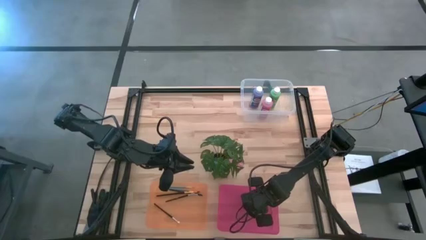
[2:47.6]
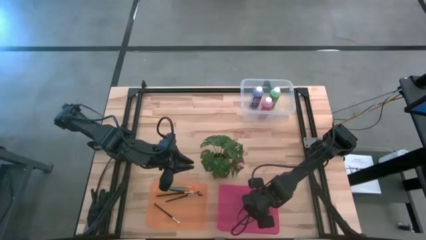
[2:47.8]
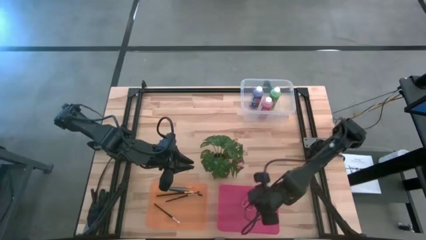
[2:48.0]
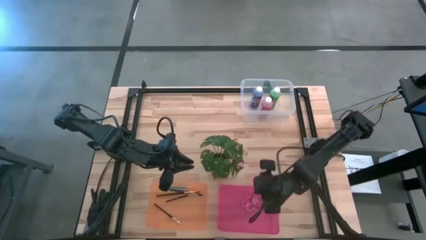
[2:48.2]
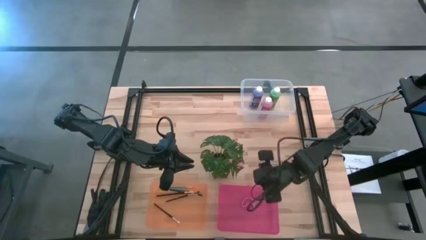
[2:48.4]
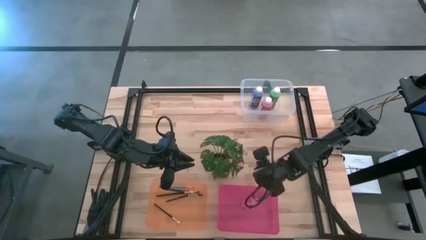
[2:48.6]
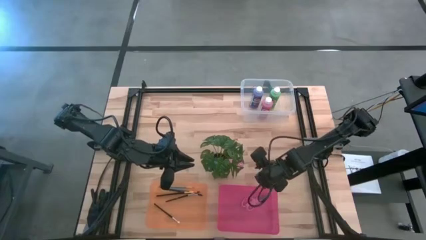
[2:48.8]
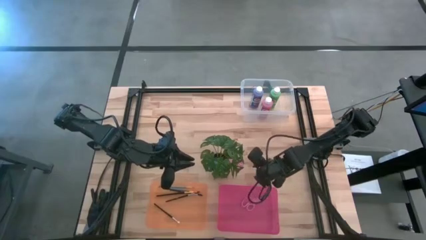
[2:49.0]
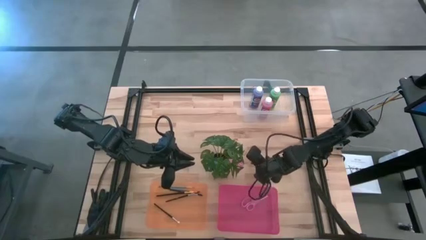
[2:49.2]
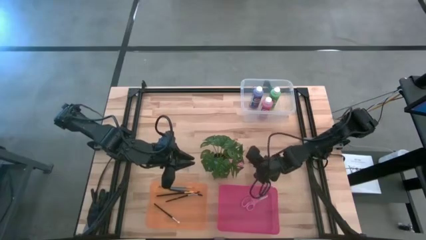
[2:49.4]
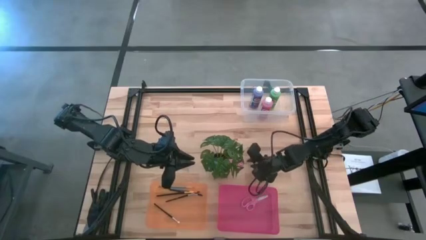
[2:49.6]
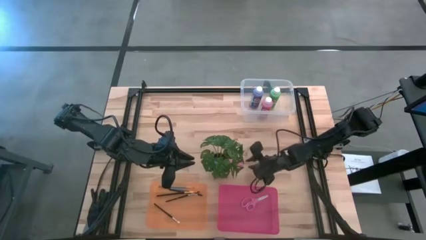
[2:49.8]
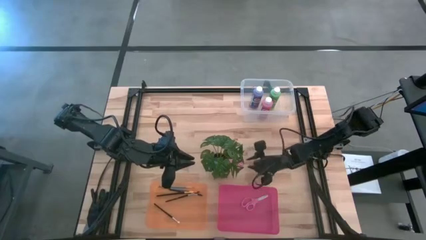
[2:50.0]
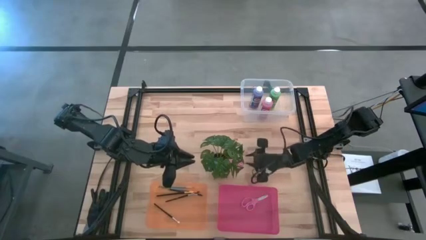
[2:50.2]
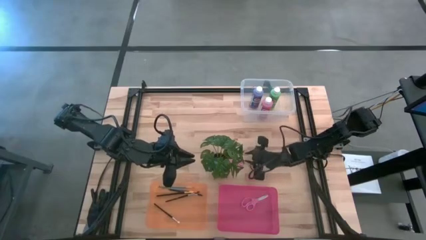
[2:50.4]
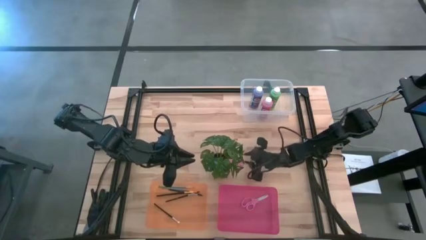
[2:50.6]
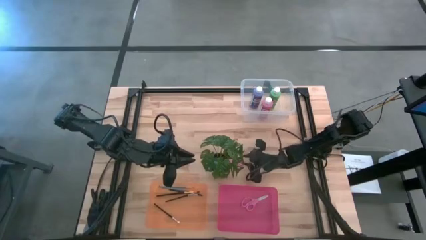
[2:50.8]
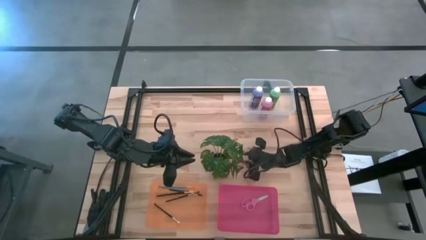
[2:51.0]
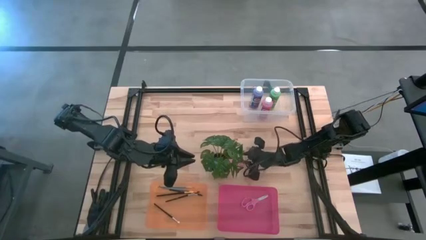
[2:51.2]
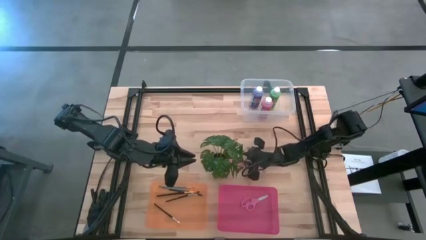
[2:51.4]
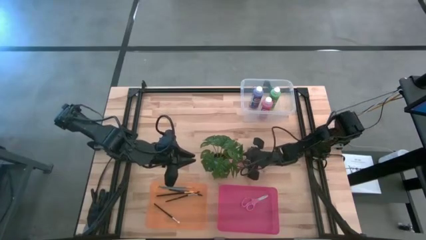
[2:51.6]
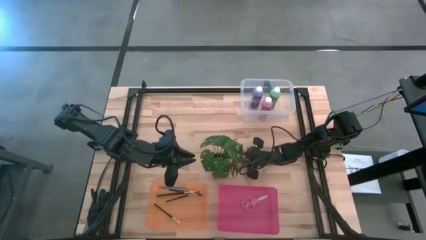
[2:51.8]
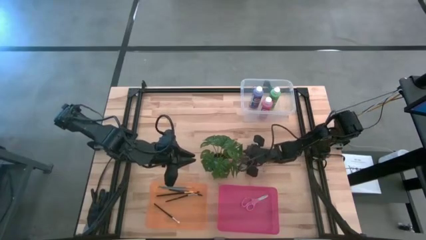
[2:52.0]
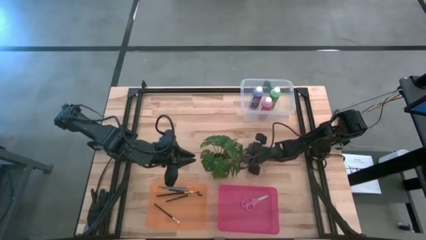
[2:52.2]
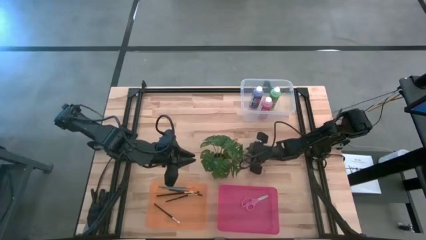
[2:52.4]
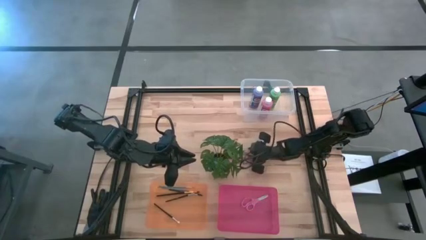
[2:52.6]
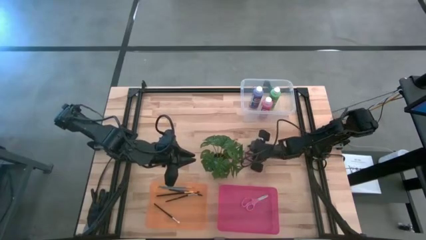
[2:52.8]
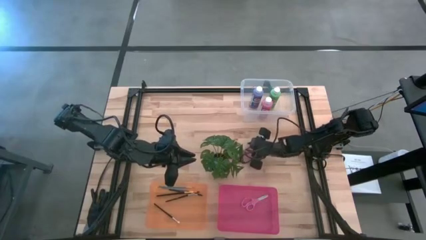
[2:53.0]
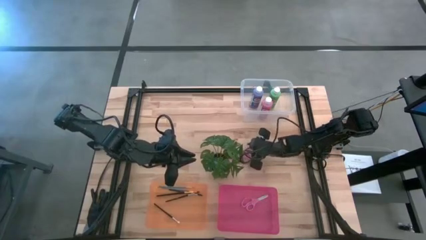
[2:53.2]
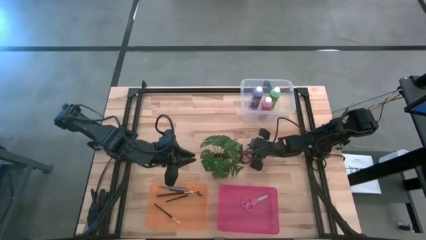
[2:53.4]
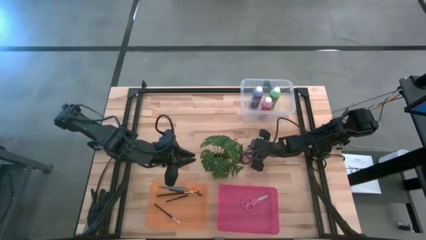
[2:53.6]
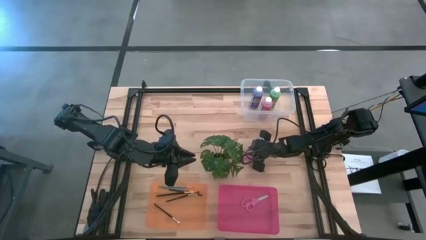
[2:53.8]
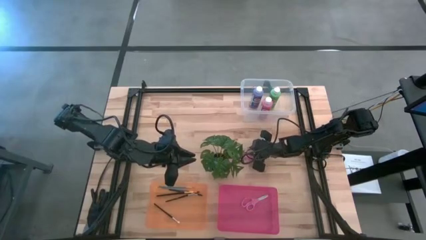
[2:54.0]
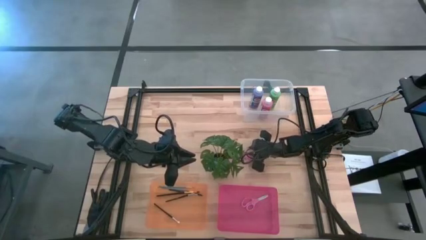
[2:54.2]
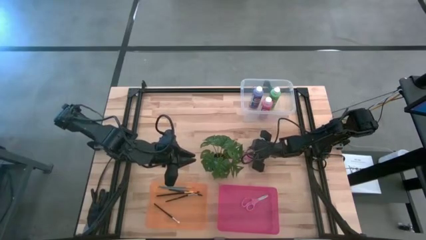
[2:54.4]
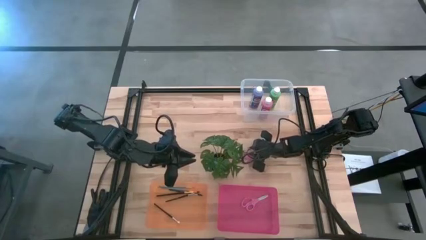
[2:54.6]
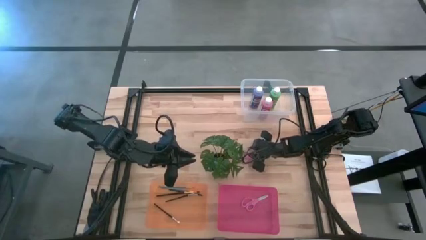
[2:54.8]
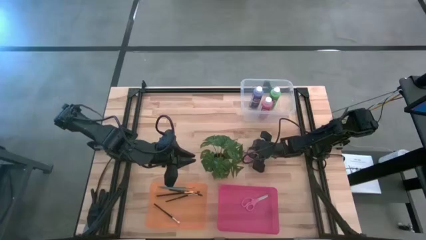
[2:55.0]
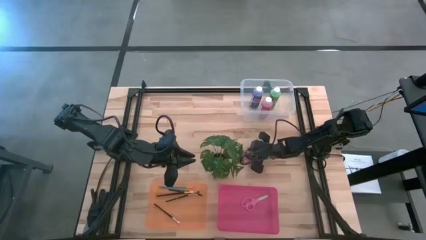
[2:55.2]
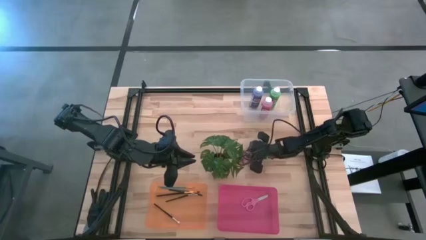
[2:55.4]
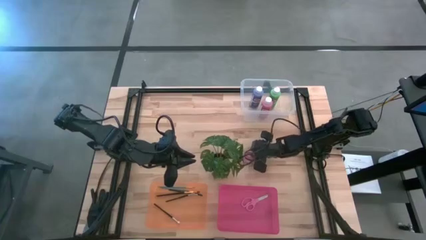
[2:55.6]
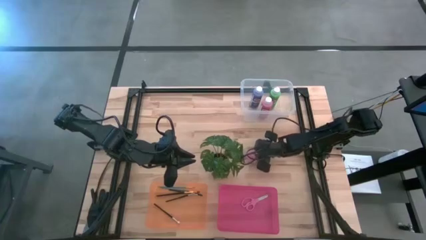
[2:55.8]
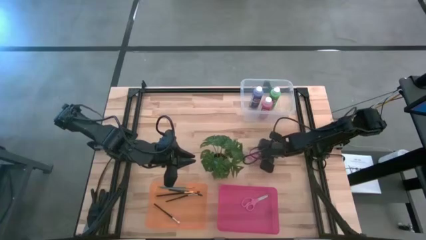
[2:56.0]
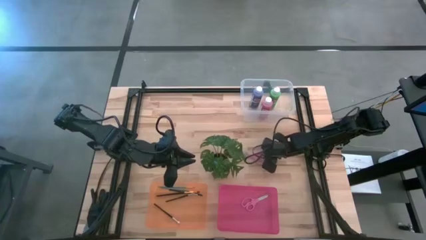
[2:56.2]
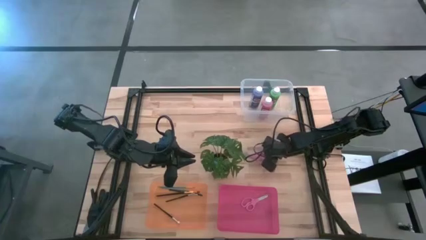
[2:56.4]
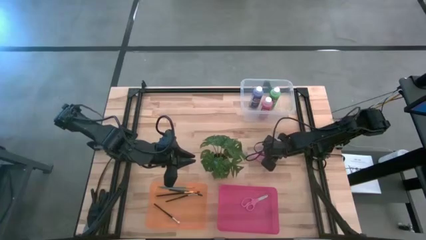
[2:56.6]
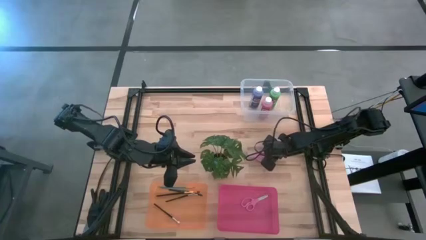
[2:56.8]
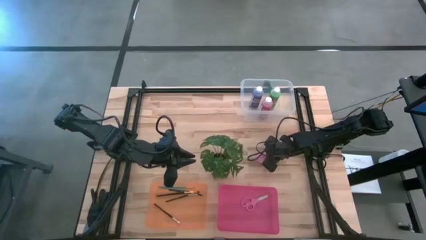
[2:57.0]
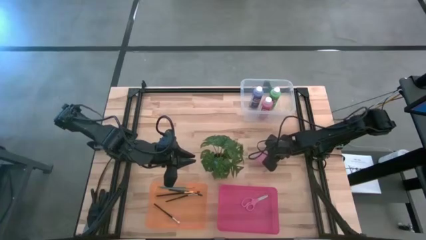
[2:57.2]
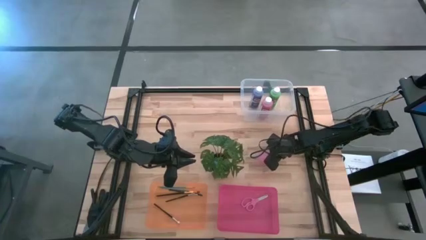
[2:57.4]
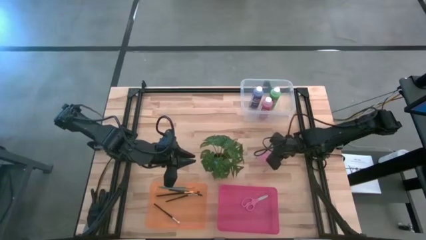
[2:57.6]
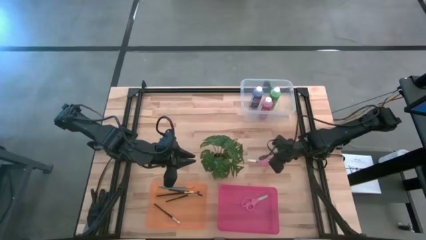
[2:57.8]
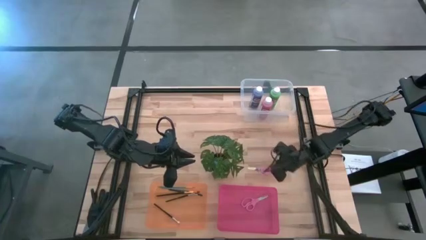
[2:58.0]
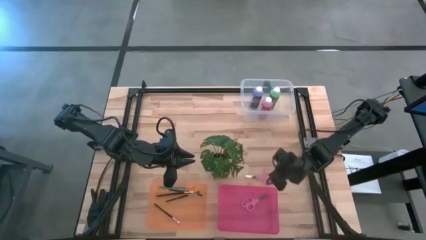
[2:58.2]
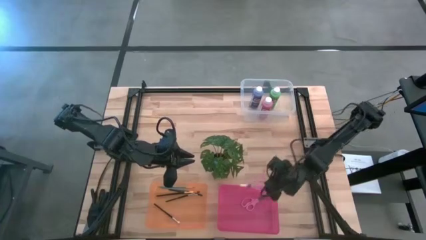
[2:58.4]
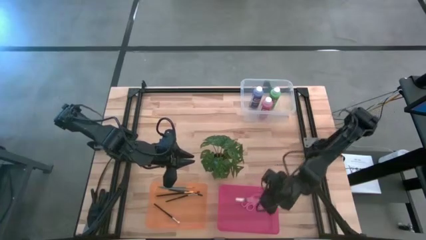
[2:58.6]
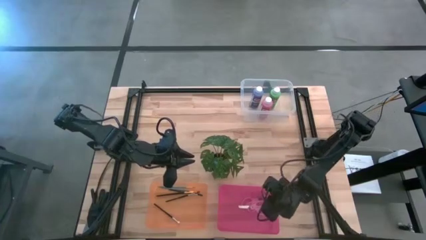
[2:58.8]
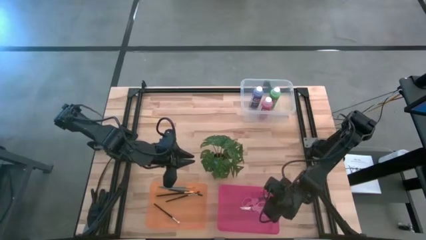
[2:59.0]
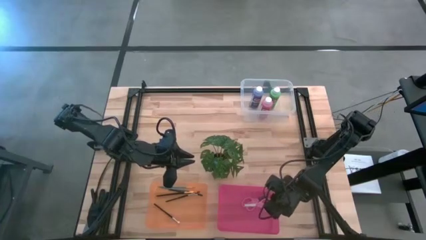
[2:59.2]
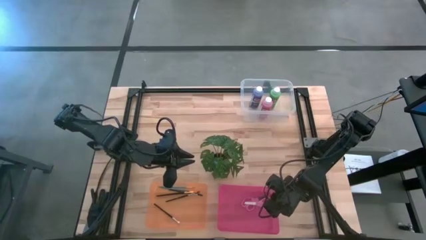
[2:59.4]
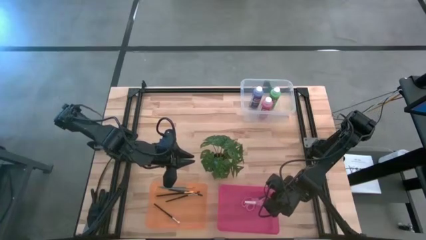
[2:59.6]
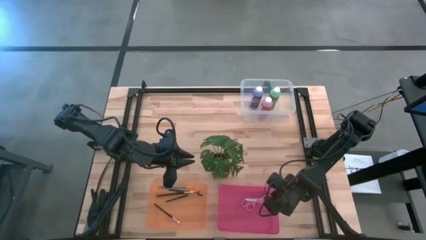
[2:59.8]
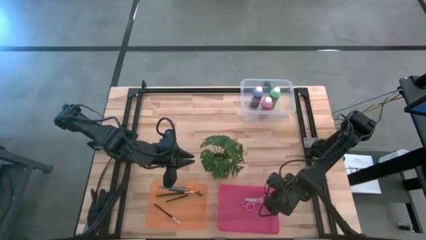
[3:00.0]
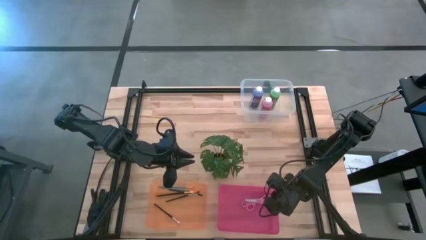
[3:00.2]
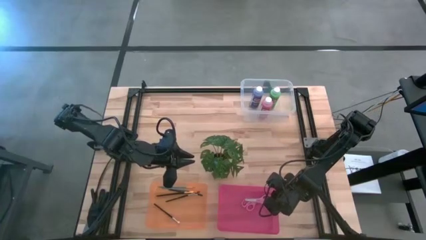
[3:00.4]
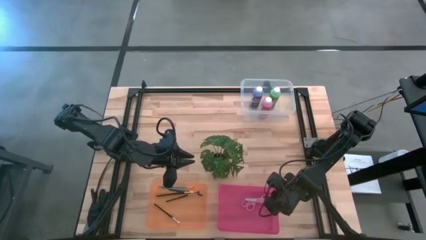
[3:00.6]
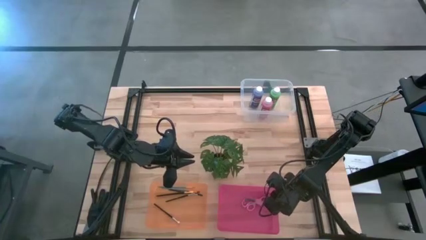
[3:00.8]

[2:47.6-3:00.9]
Task: Pick & Place Paint Supplies
Put the right pink scissors into the pink bin
